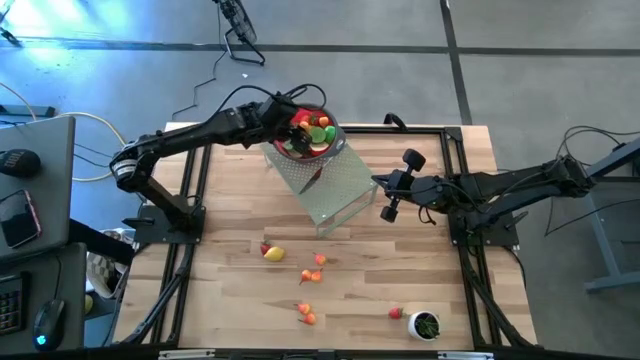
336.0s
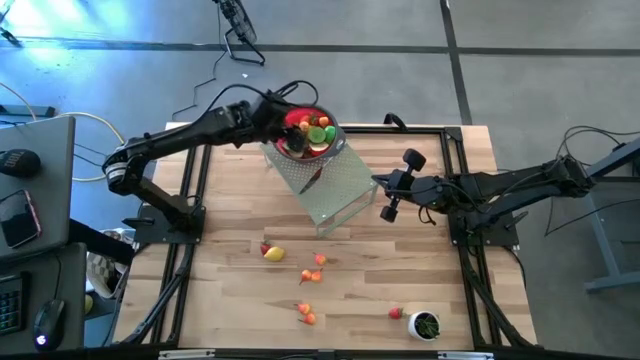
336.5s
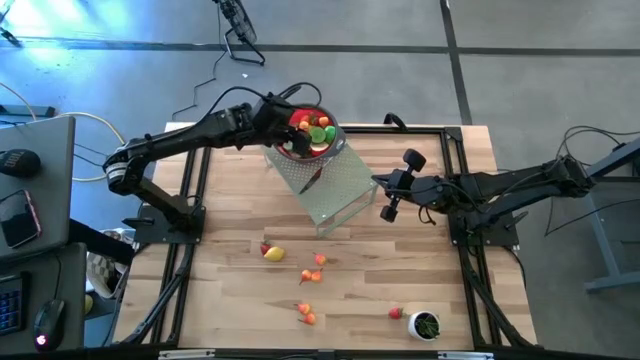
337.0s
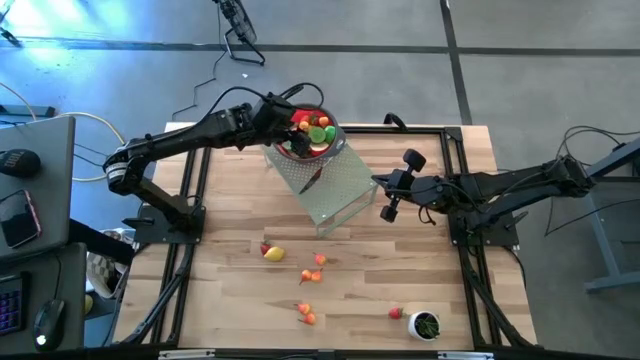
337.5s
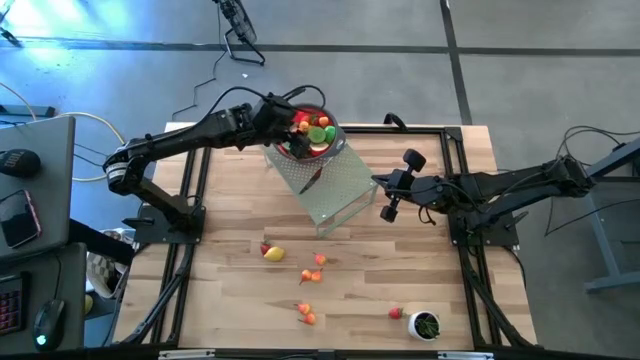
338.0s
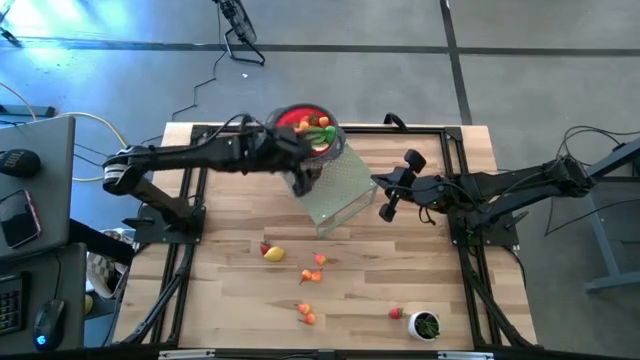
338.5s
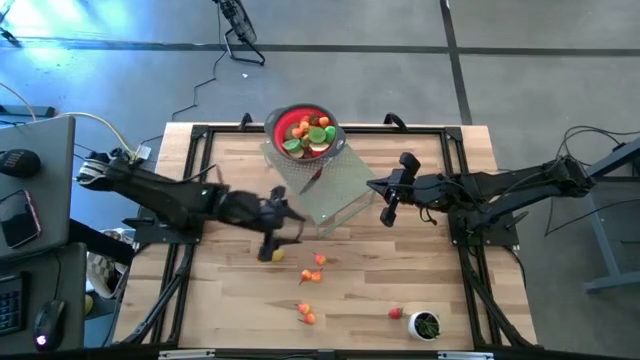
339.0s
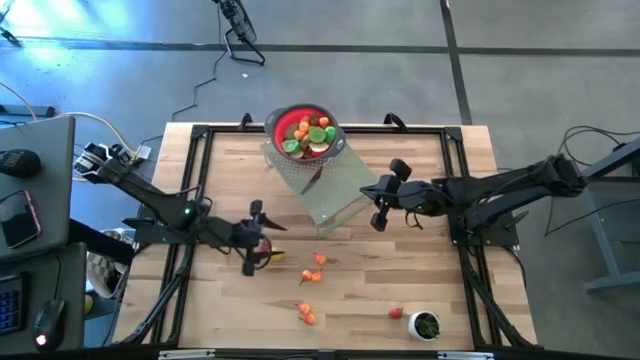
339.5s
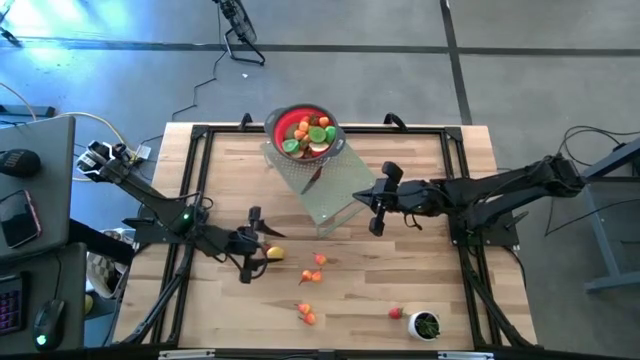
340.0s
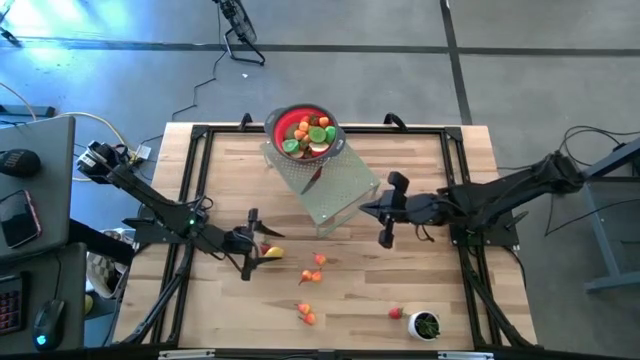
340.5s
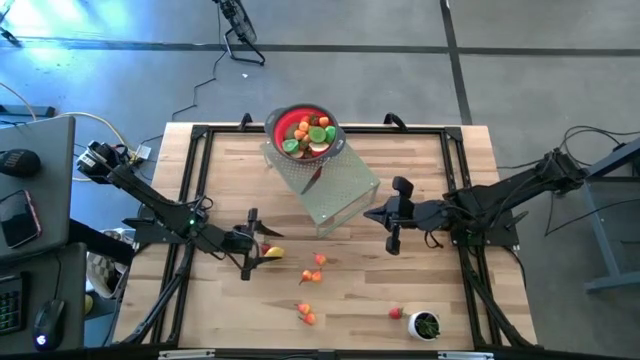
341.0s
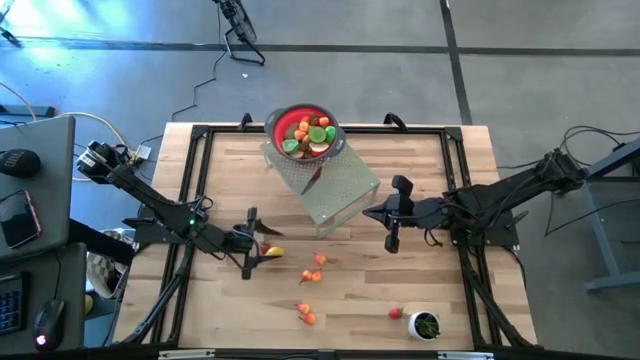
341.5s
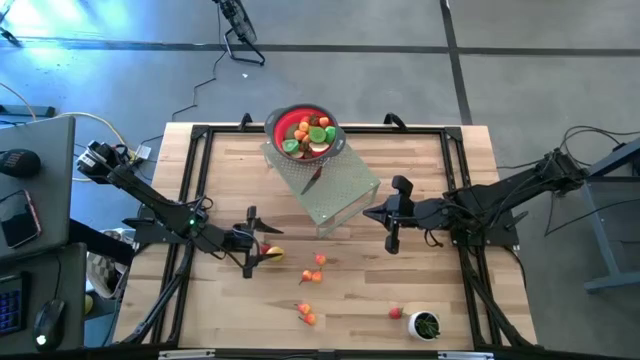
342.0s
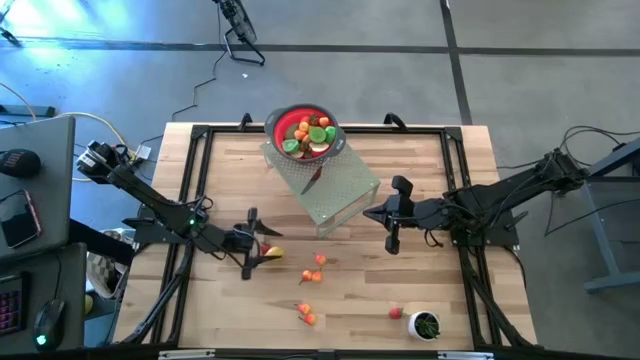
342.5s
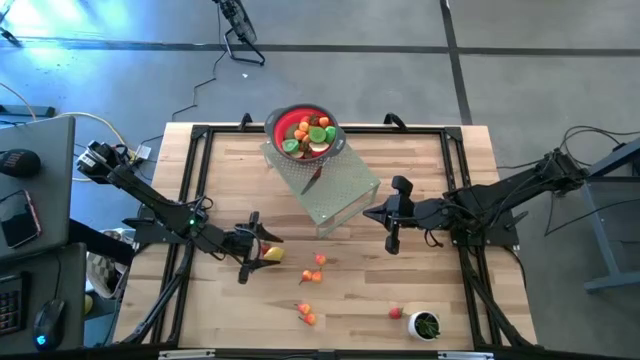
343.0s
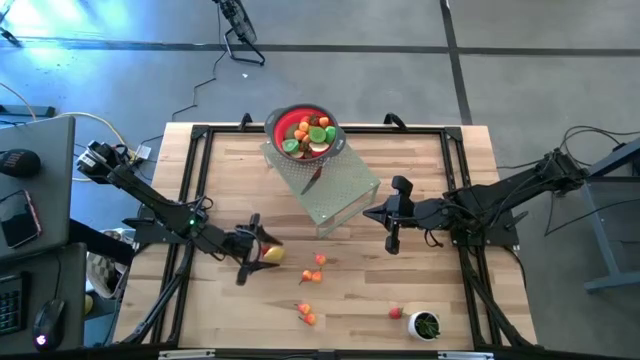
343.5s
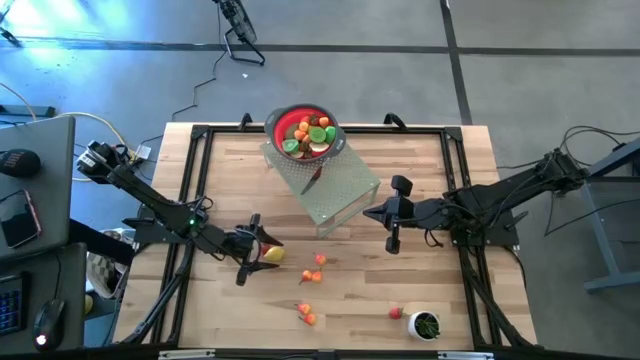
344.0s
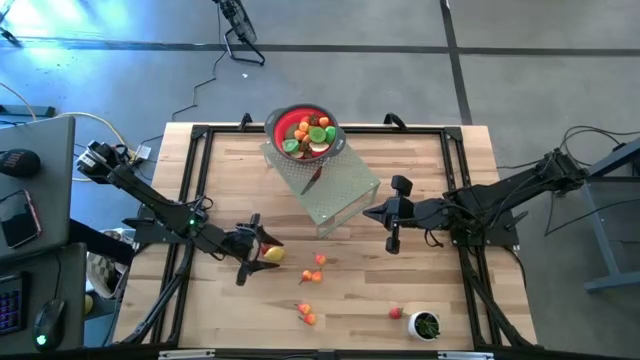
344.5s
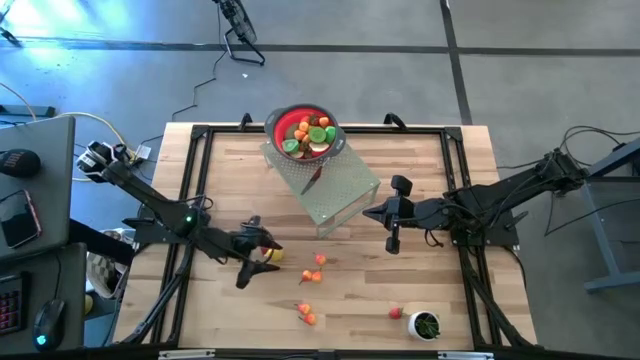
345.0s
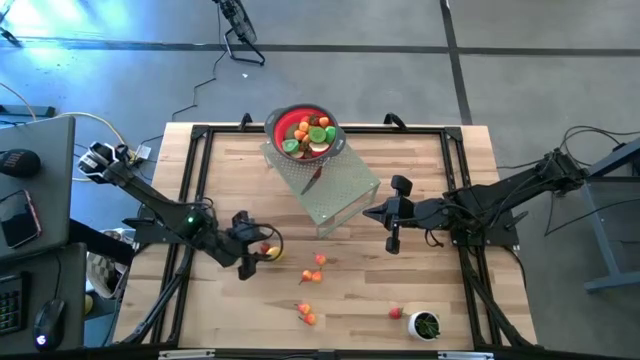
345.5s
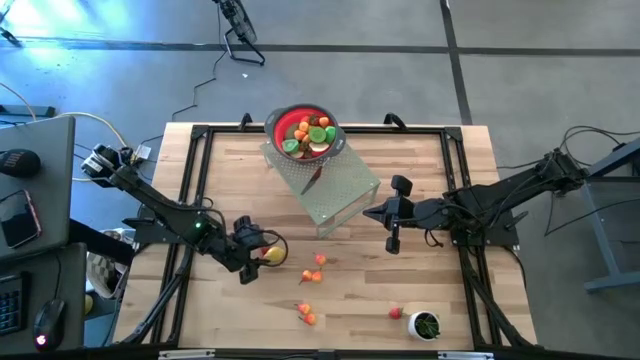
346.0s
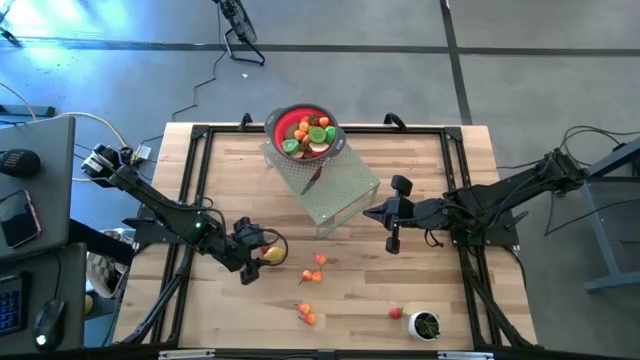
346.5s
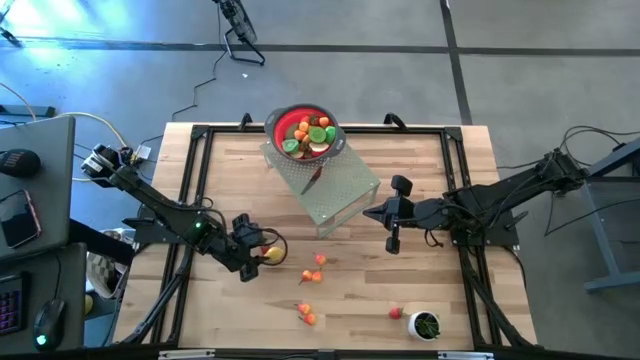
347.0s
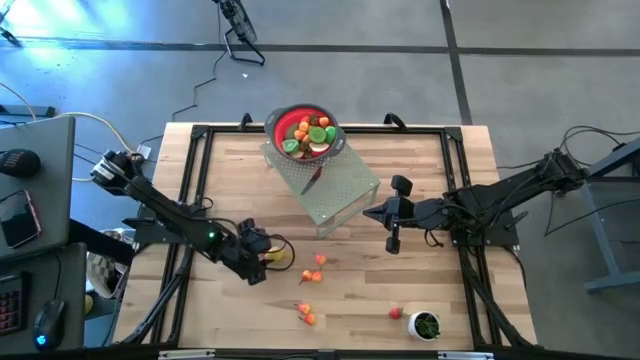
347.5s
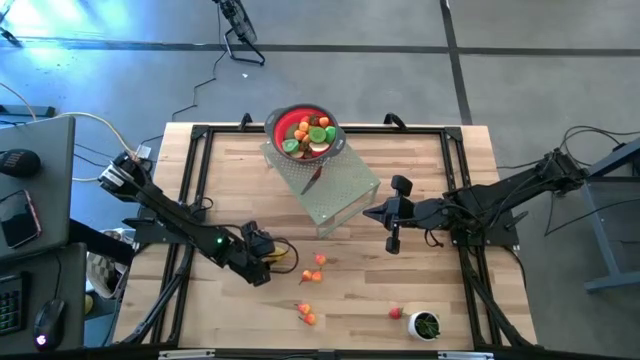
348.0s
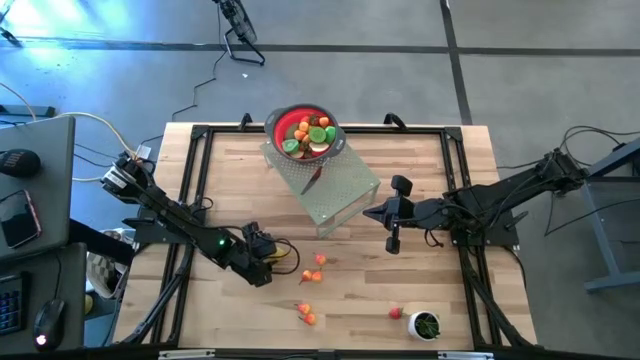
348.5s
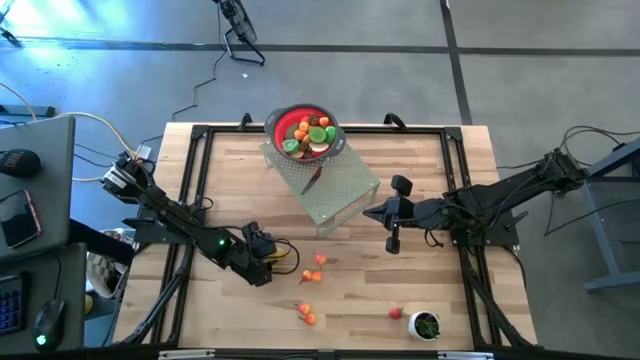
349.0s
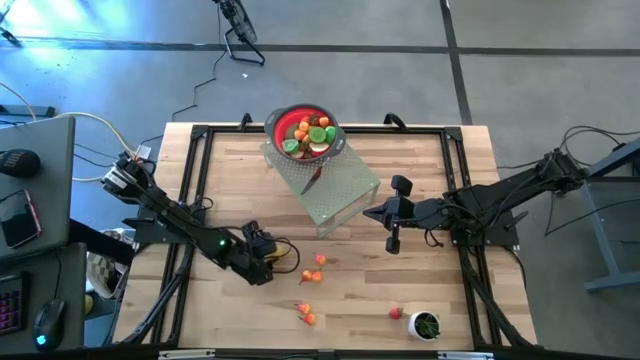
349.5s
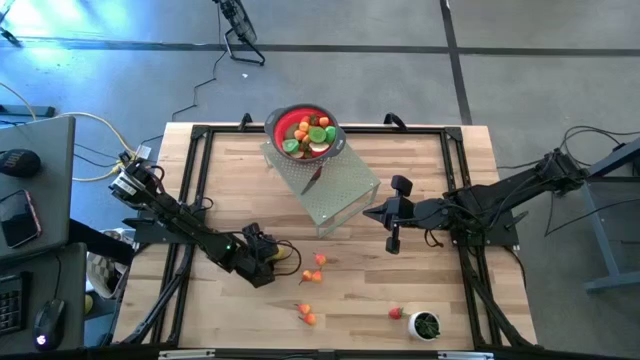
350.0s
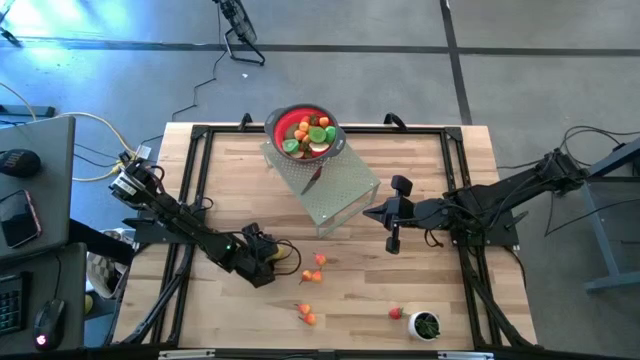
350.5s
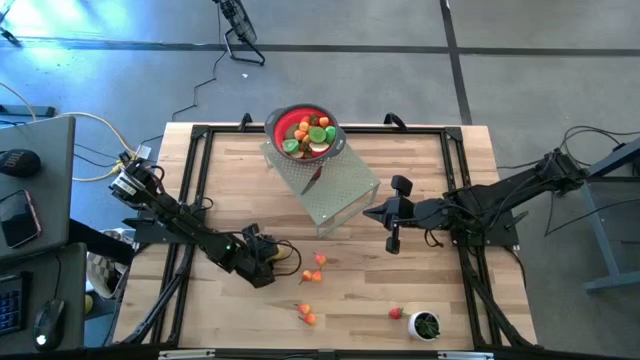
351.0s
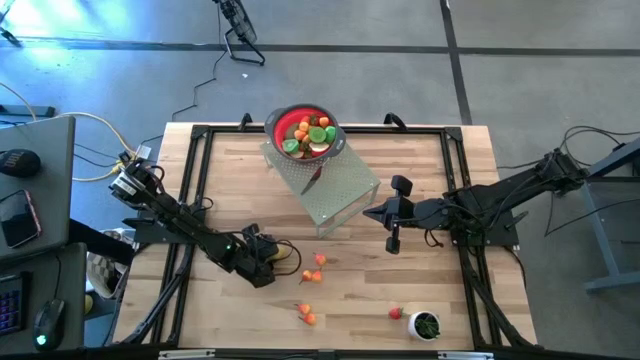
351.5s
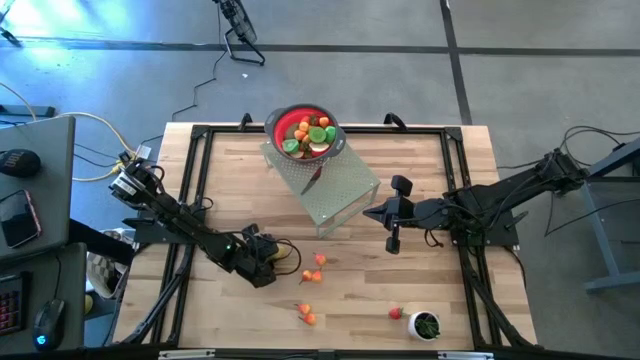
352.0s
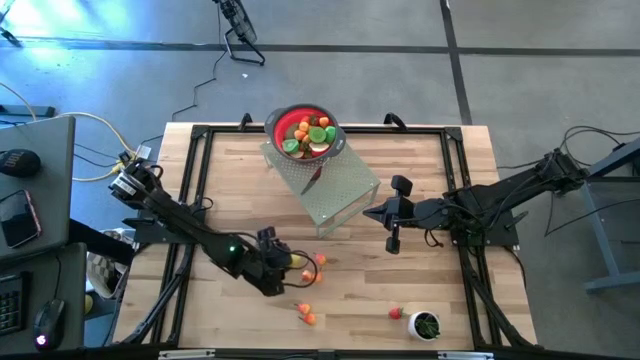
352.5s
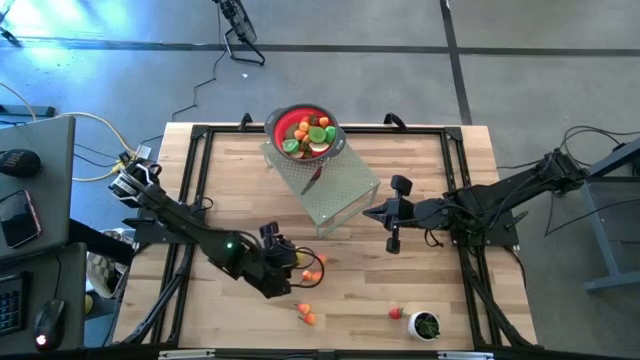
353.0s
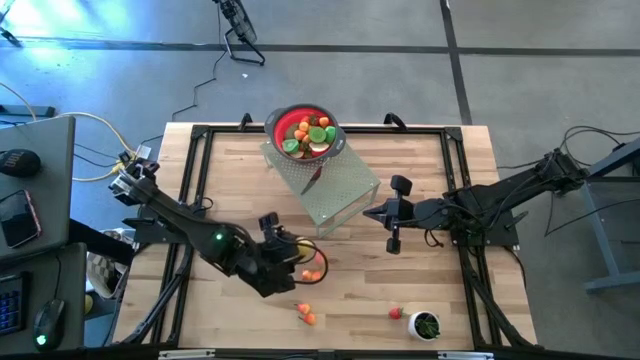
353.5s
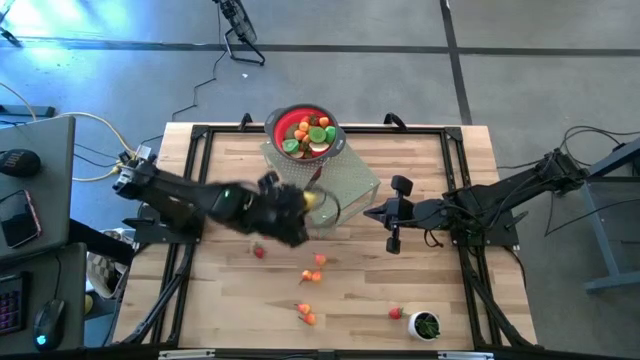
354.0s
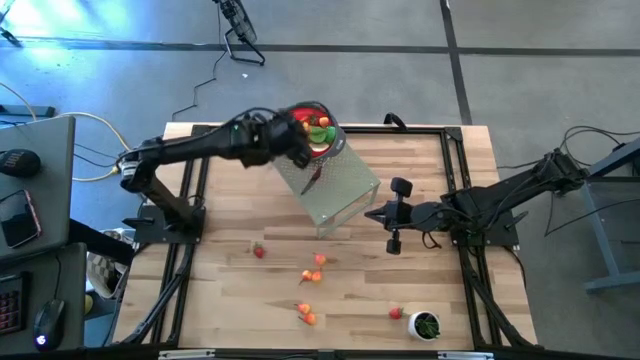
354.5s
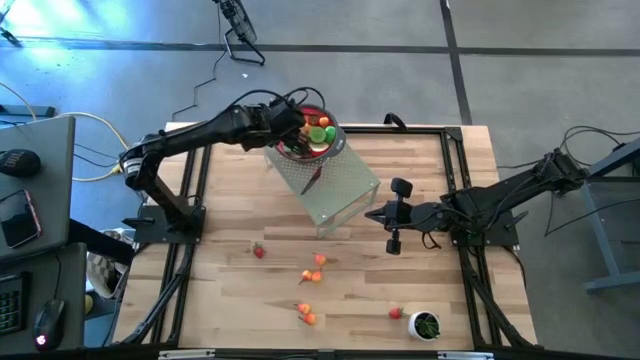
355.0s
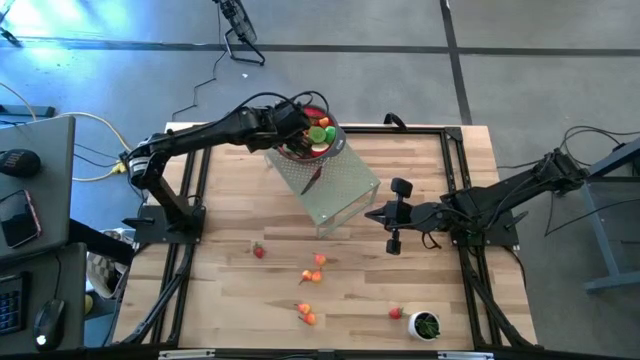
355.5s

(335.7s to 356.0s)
Task: Pick & Place Fruit
Put the lemon into the red strainer on the shelf

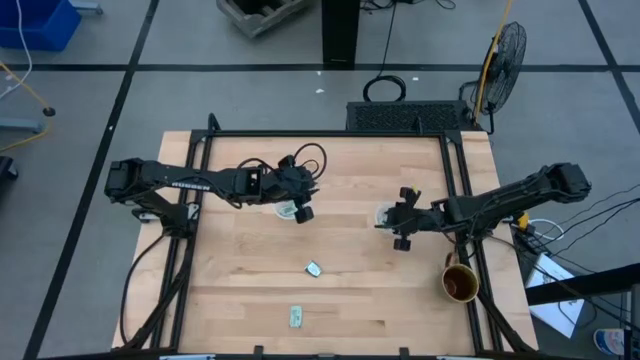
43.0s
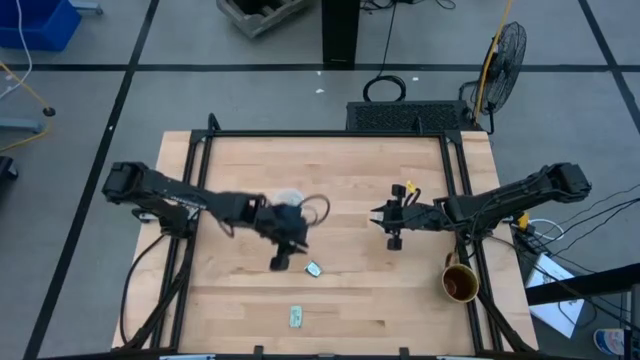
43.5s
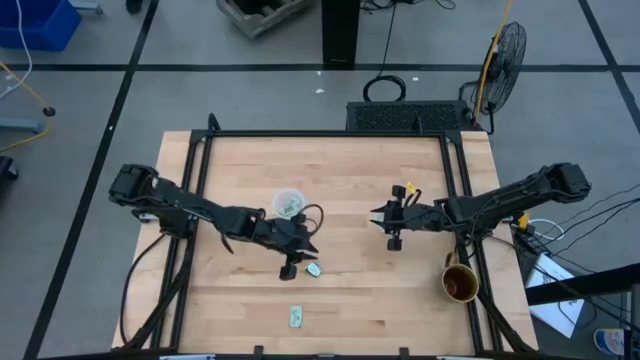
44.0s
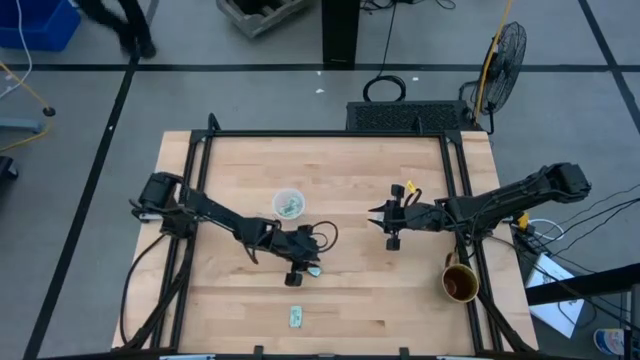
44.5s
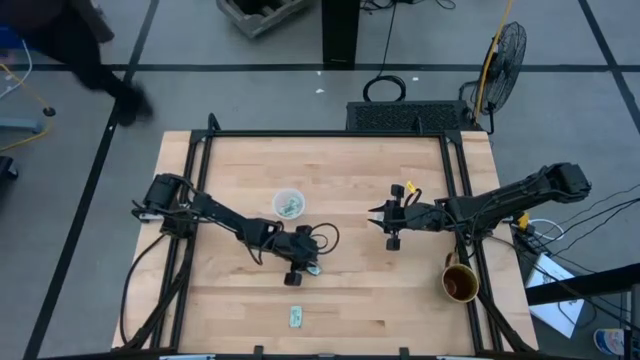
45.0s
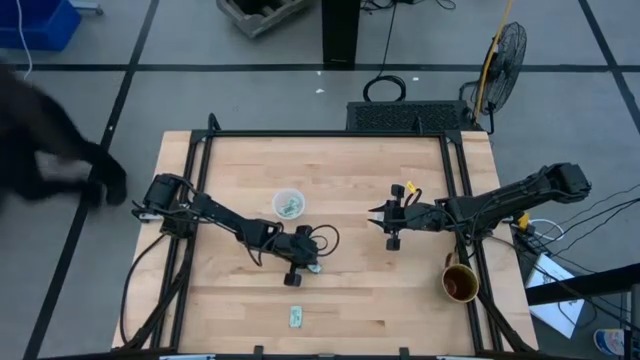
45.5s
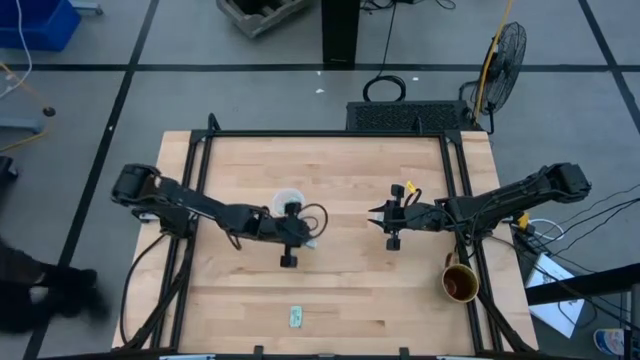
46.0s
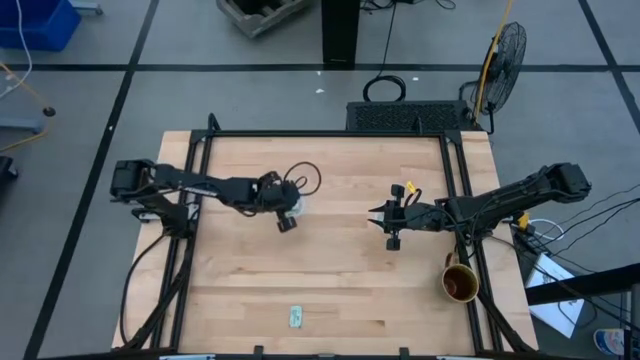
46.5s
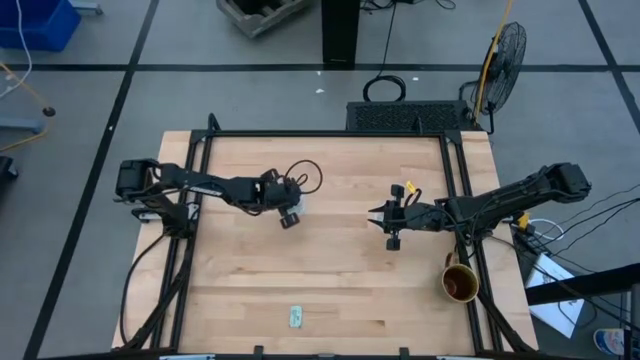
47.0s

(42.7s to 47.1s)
Task: Pick and place Stevia / Truvia into bins
Put the truvia packet into the left container
